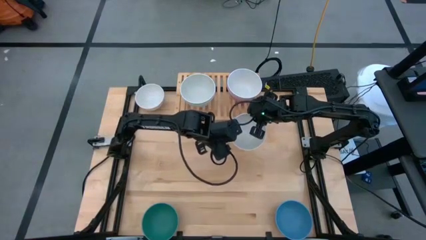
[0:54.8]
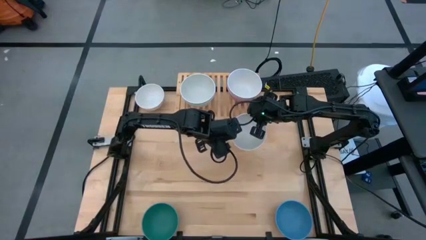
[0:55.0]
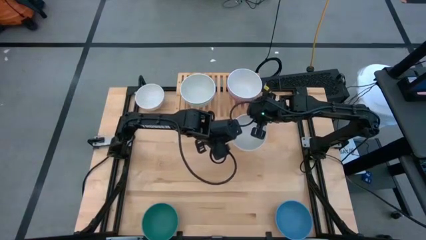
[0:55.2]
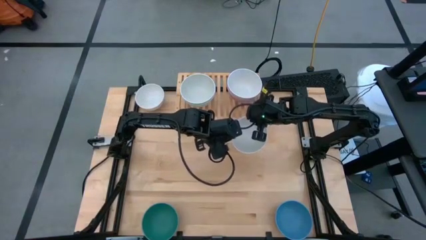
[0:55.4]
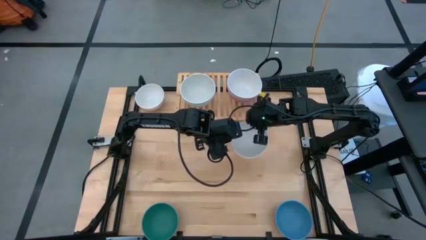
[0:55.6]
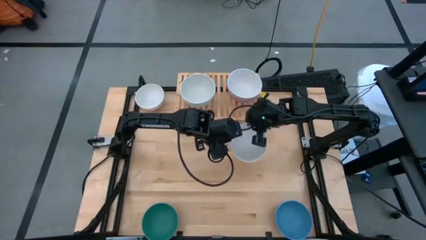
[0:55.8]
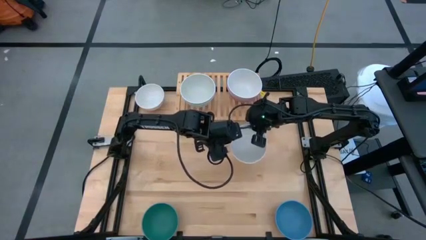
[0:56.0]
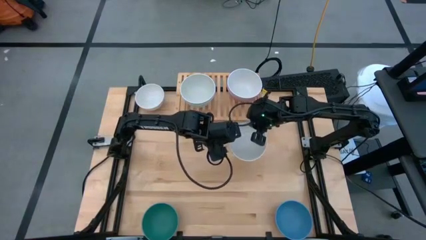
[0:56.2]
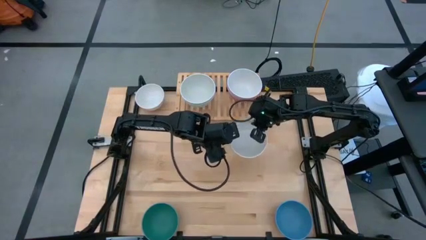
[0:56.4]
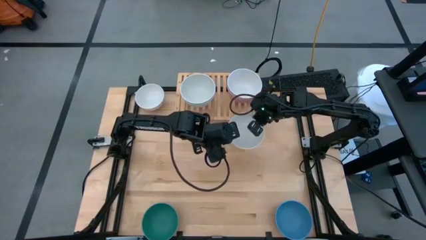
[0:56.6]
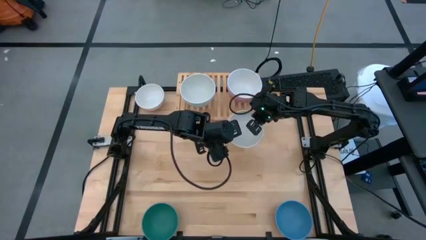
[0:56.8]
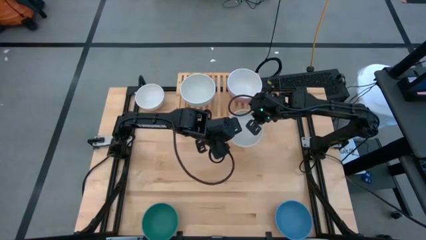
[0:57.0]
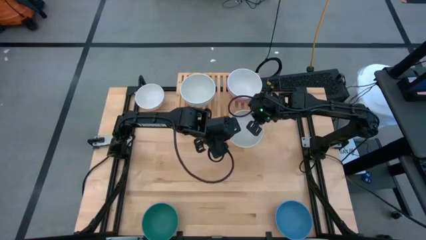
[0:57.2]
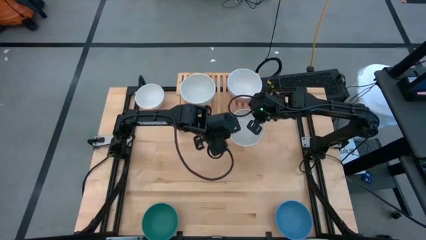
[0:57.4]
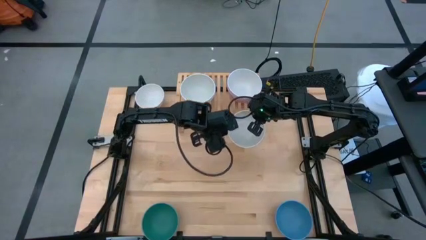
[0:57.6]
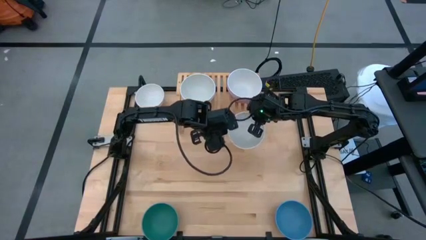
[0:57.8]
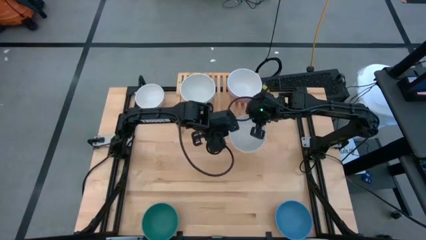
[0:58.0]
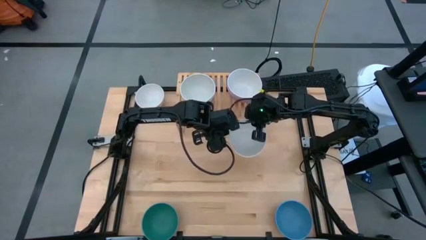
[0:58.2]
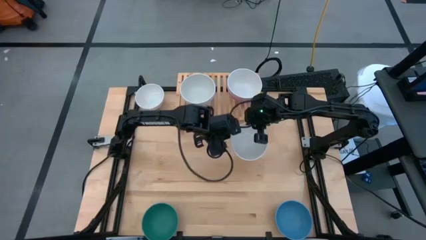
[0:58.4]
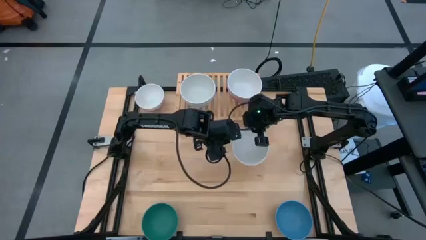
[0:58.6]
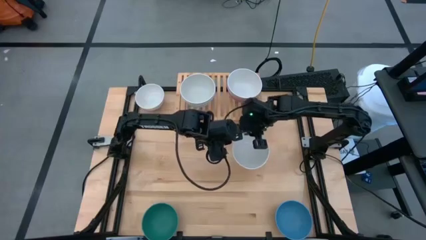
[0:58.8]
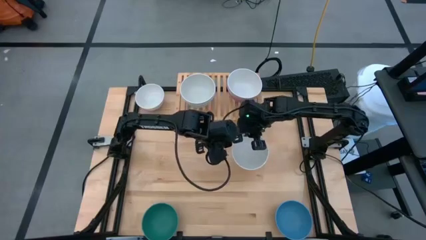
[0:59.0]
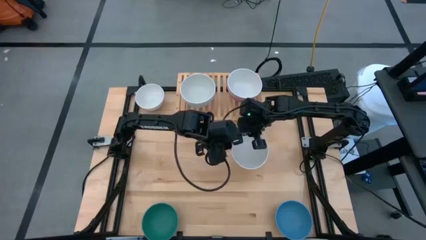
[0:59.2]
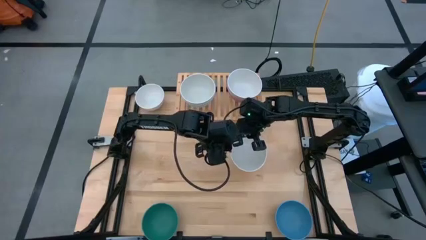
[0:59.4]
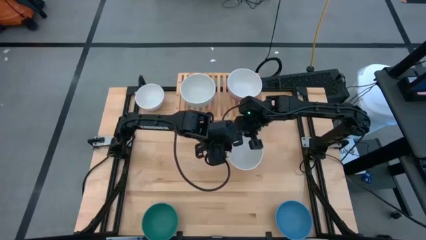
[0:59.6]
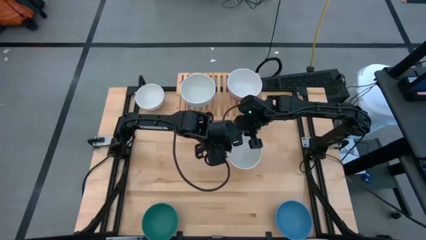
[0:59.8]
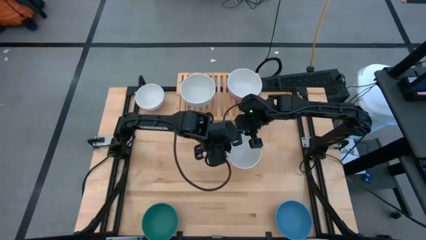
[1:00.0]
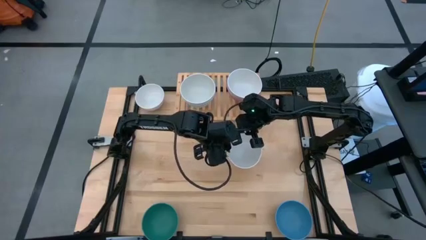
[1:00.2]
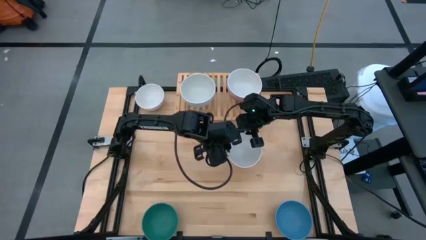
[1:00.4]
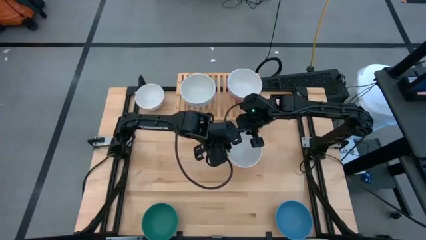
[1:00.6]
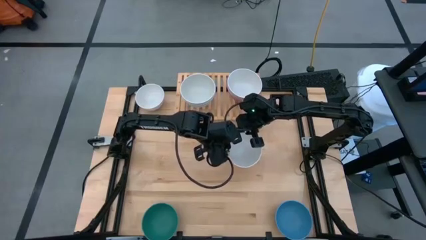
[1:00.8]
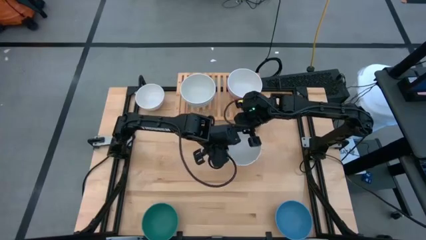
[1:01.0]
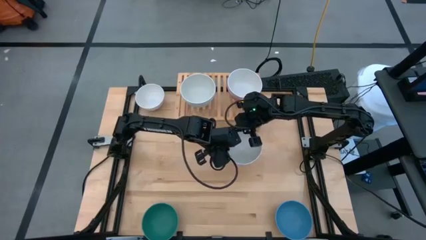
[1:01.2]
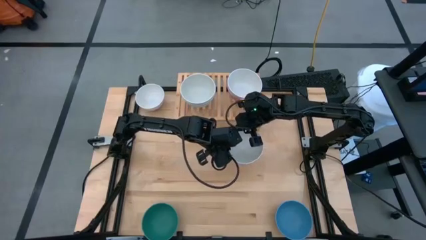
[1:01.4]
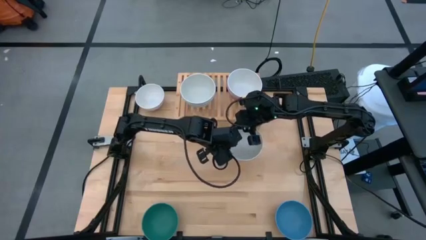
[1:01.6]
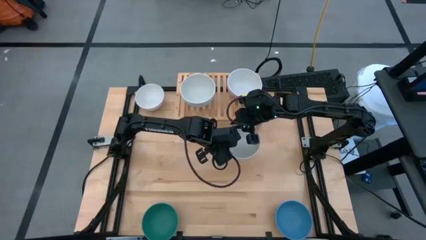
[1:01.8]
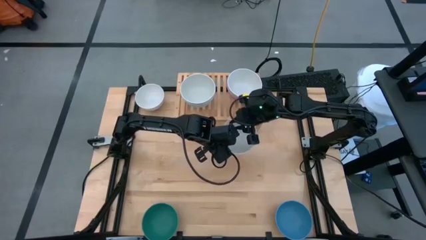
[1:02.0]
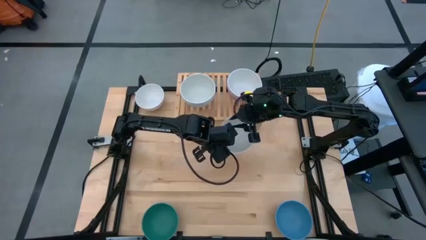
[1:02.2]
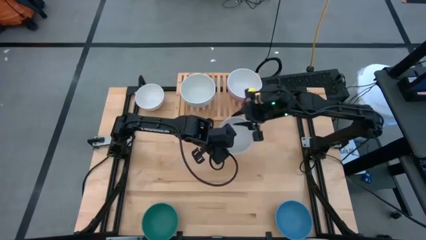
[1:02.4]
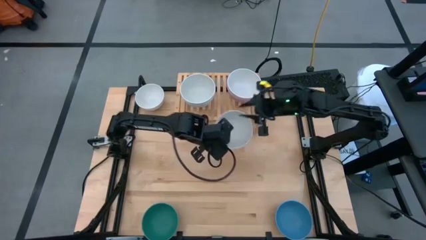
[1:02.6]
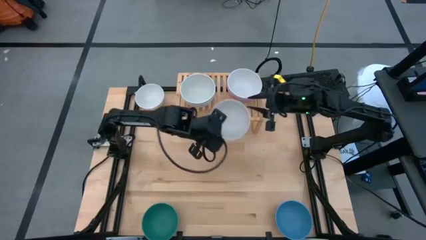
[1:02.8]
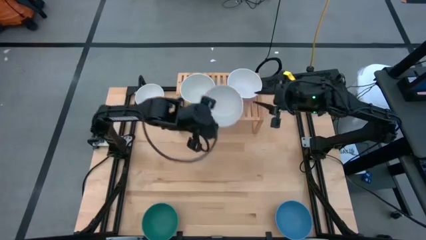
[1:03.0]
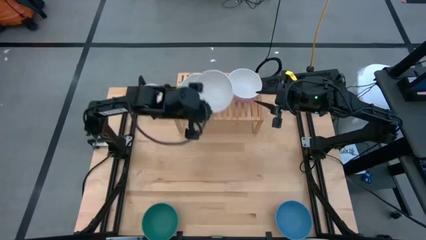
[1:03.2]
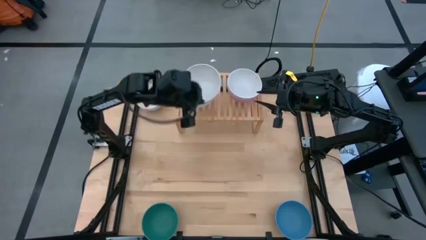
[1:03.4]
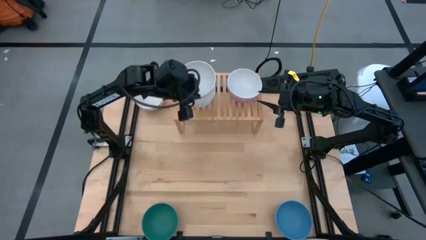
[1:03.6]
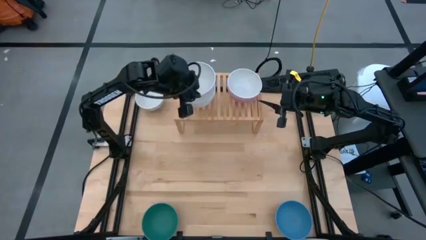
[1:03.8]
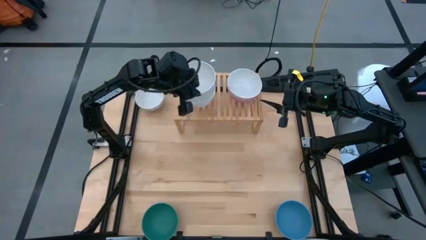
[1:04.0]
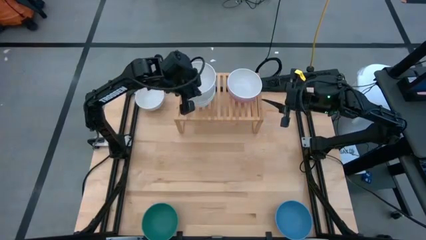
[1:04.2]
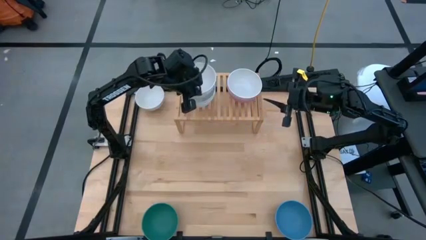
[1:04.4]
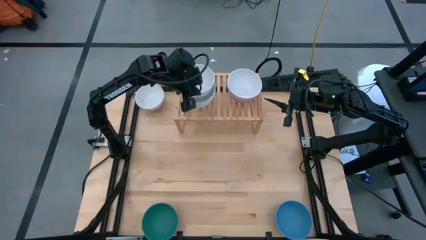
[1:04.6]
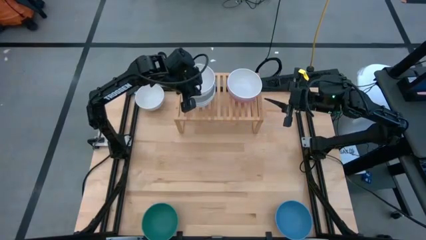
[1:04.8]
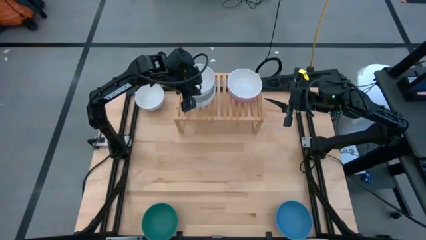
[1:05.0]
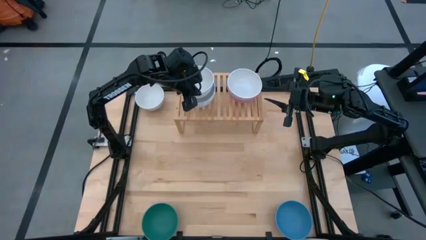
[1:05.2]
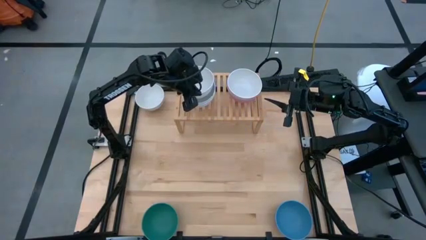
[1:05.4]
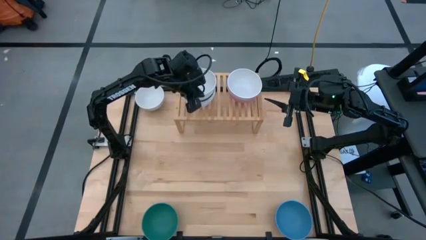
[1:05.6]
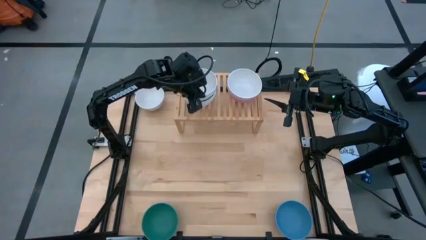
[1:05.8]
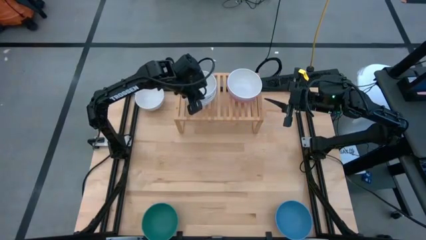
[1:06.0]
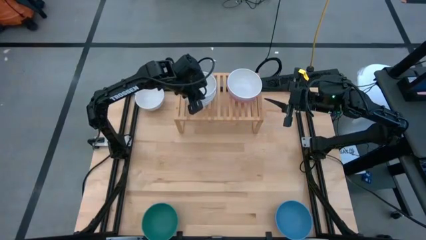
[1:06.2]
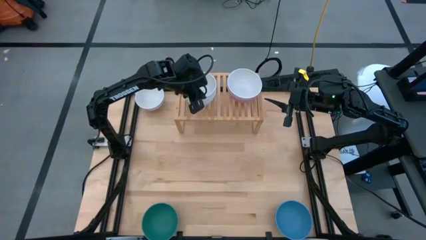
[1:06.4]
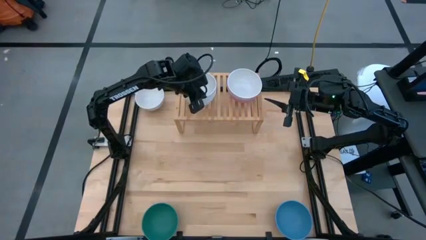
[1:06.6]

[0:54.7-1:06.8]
Task: Place and stack bowls onto a shelf
Stack the white bowl on top of the gray bowl on the shelf
